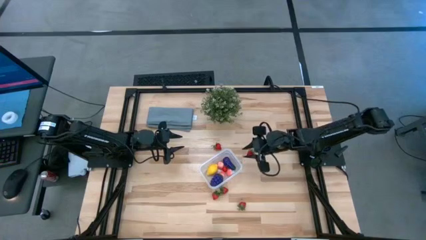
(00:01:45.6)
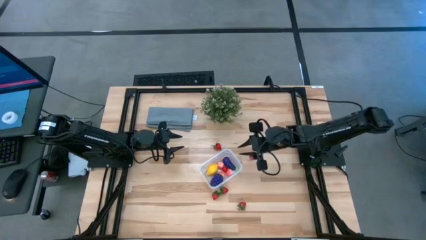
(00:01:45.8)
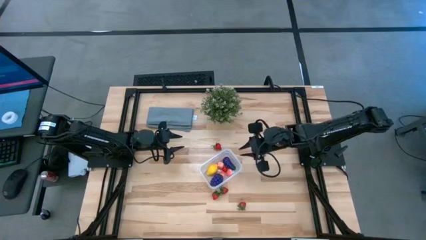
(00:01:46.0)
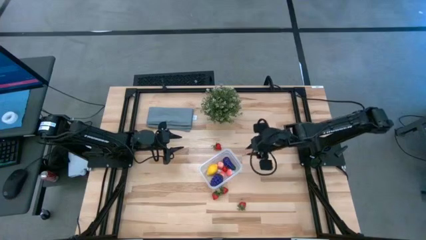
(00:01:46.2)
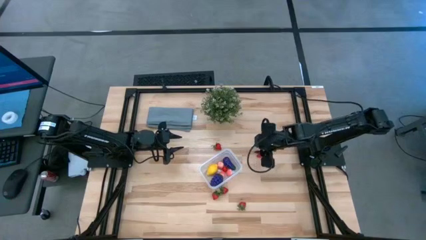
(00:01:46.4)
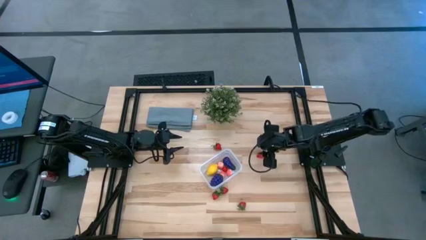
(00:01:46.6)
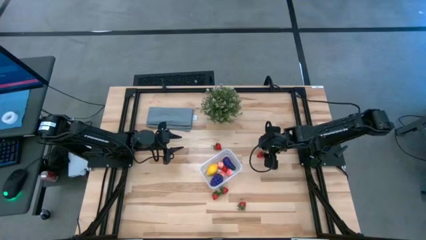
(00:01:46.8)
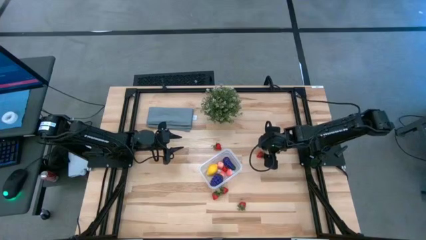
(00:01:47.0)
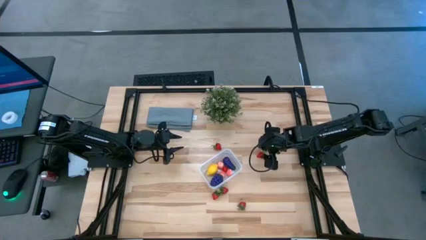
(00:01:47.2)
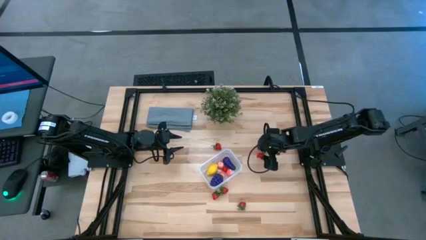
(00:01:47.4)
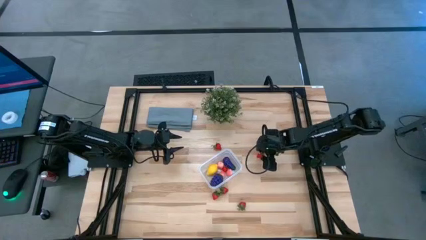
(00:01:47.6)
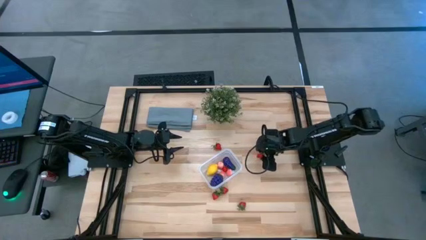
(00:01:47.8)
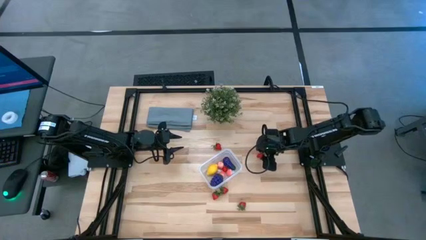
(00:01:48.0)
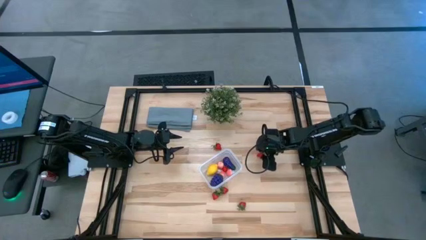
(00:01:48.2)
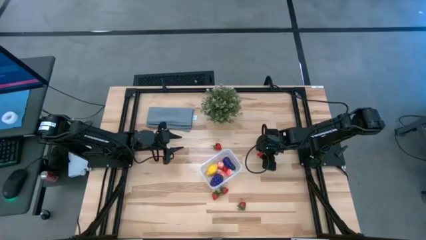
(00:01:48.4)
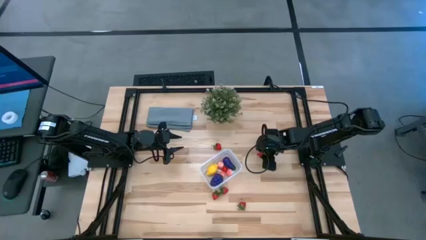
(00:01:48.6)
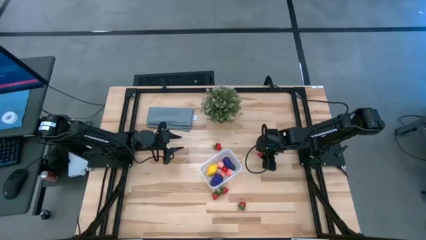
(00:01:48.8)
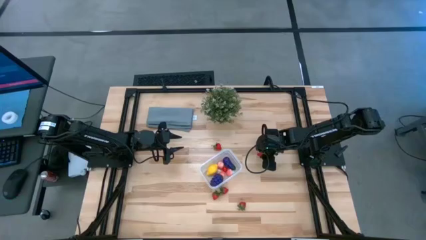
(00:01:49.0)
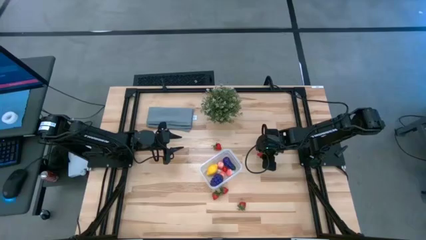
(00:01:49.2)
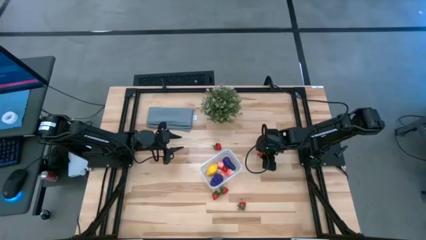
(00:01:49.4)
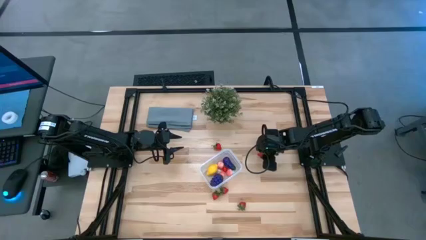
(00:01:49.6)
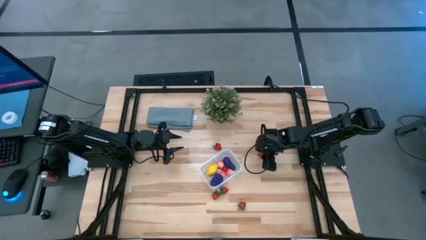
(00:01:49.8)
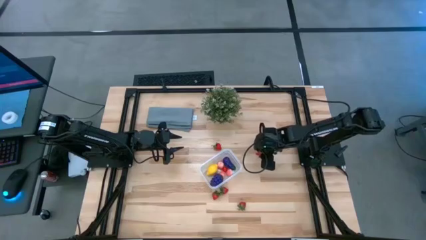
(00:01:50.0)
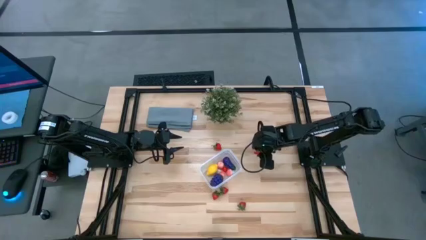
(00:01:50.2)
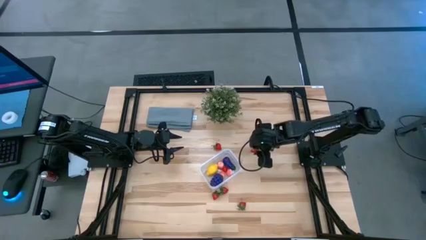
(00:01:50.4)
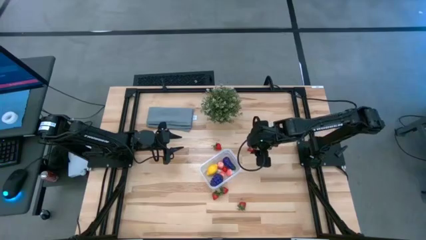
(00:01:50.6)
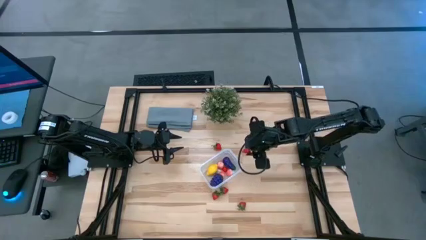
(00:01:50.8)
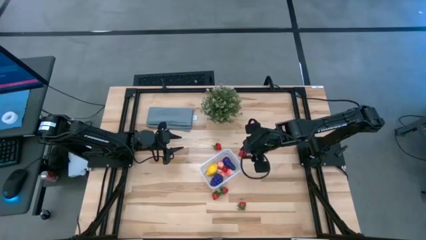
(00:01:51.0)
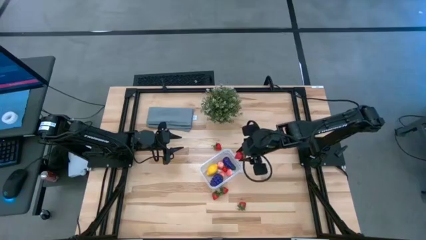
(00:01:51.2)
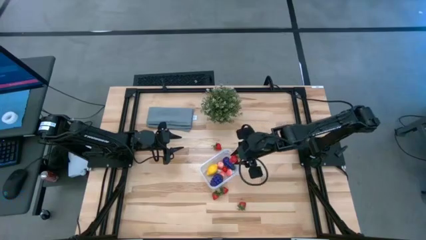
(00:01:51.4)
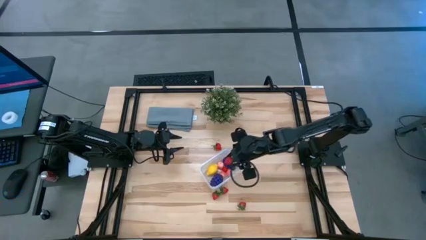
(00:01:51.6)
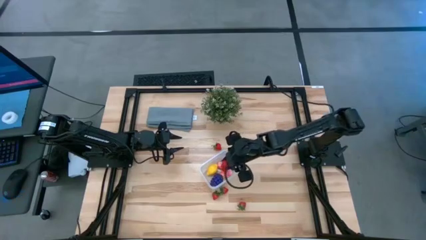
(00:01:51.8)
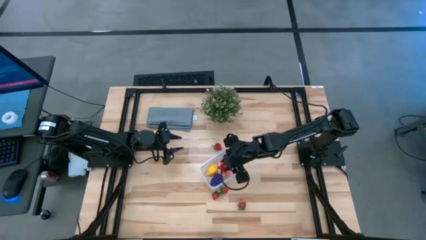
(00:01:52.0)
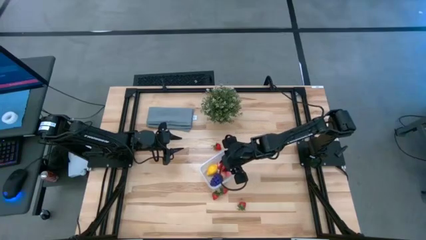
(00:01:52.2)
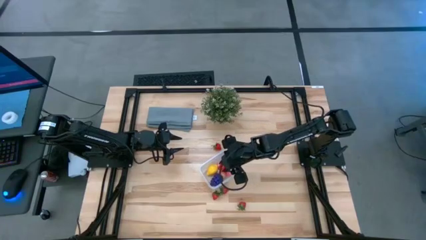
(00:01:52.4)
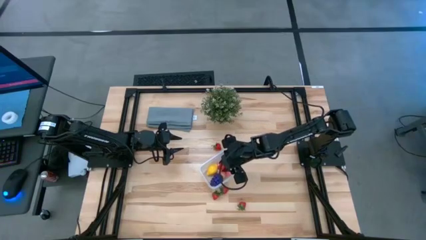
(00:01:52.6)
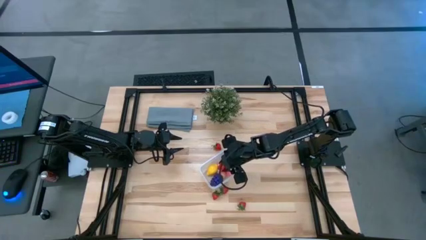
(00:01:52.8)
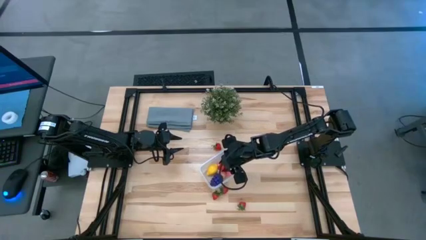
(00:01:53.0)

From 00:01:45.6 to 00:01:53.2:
Task: Pick and placing Produce into tupperware
Put the red strawberry into the transparent bin

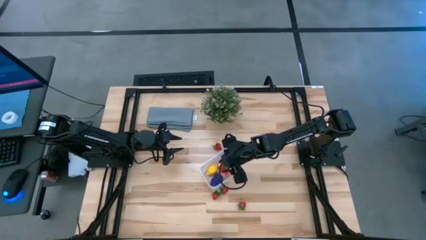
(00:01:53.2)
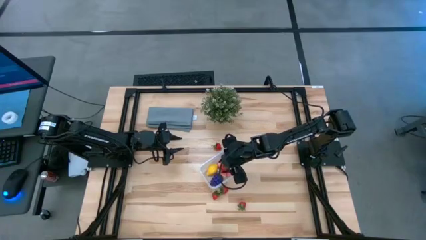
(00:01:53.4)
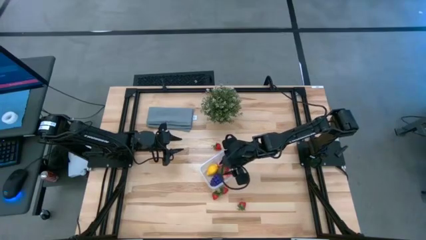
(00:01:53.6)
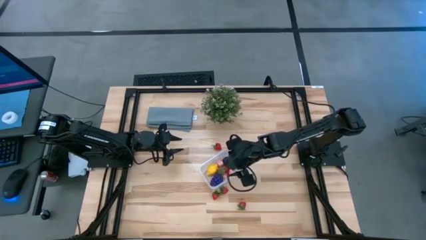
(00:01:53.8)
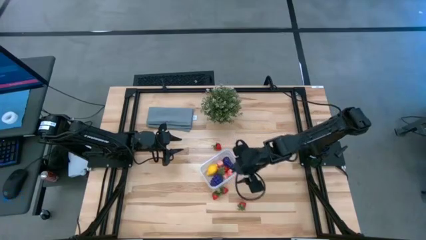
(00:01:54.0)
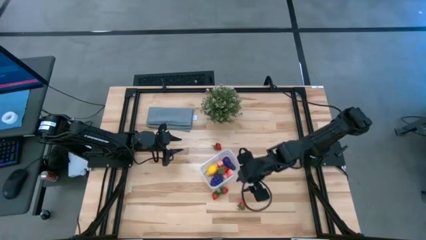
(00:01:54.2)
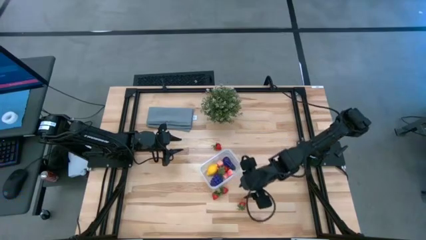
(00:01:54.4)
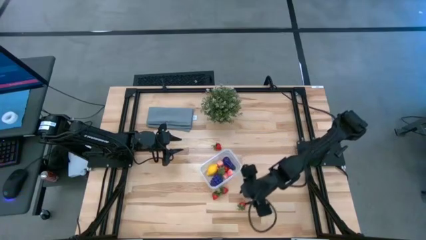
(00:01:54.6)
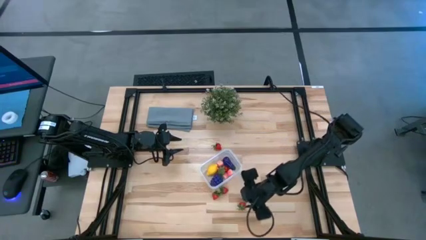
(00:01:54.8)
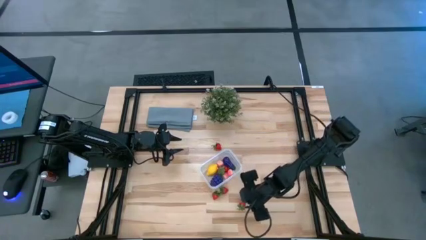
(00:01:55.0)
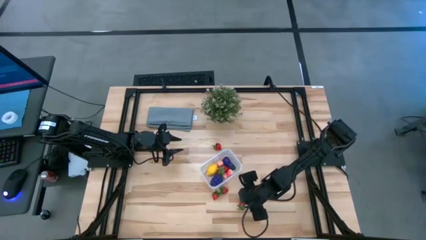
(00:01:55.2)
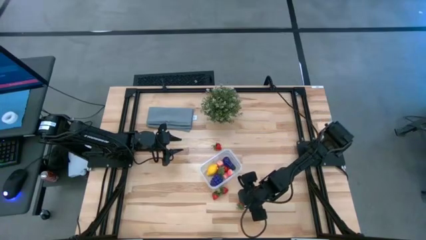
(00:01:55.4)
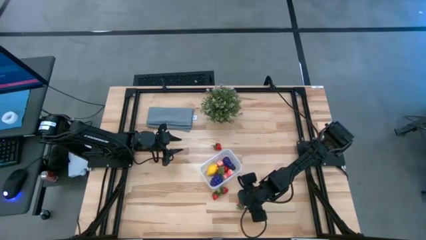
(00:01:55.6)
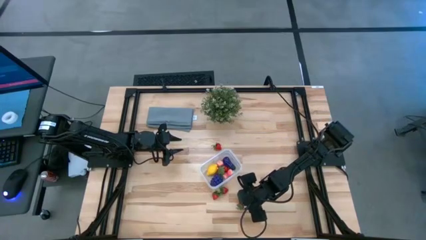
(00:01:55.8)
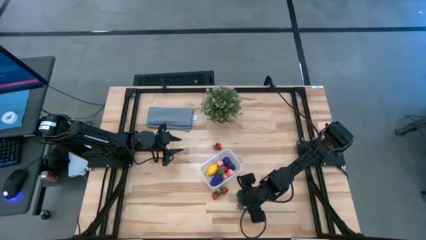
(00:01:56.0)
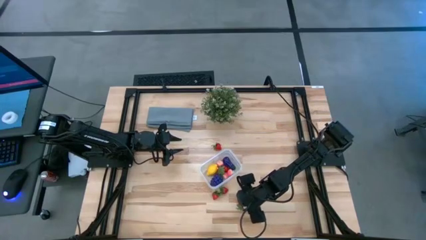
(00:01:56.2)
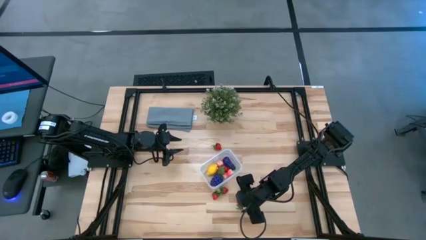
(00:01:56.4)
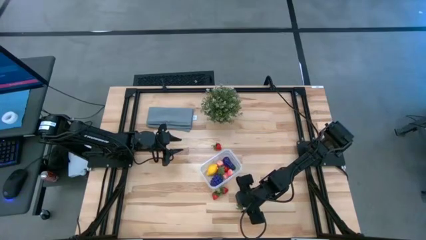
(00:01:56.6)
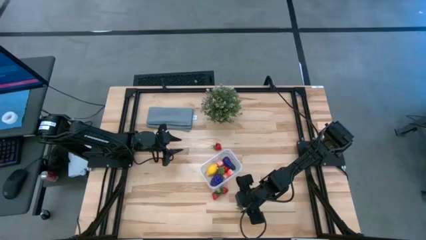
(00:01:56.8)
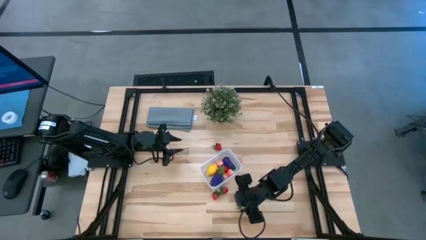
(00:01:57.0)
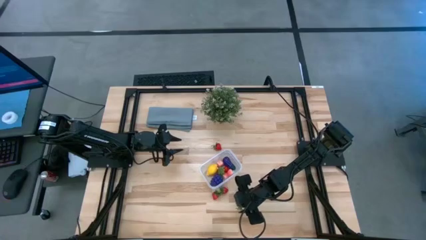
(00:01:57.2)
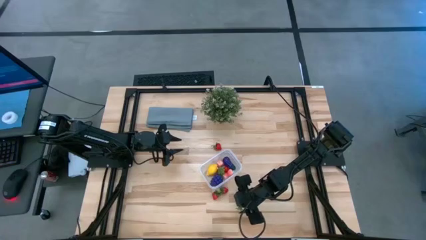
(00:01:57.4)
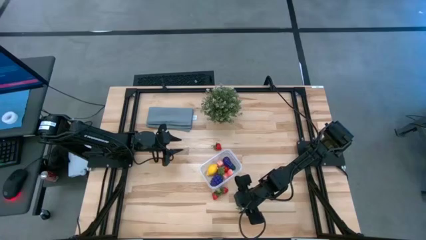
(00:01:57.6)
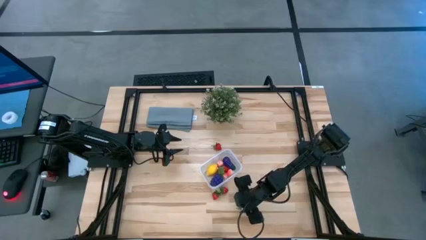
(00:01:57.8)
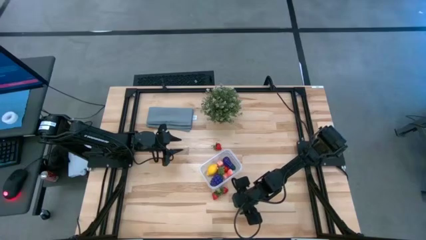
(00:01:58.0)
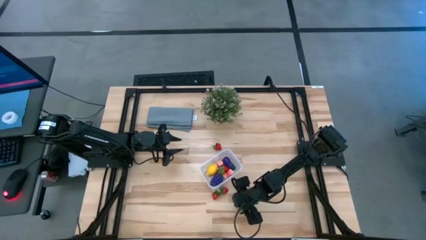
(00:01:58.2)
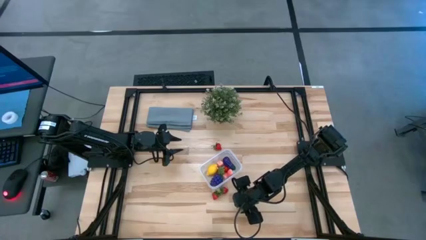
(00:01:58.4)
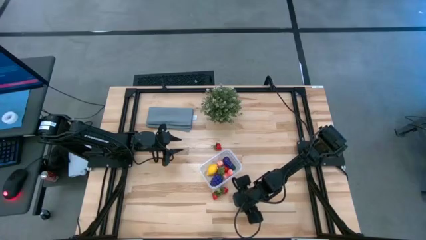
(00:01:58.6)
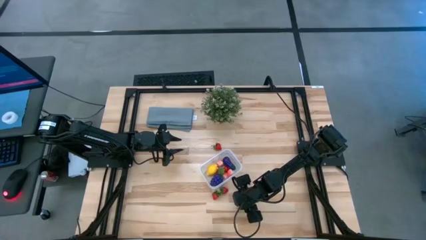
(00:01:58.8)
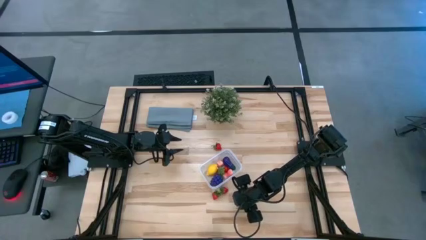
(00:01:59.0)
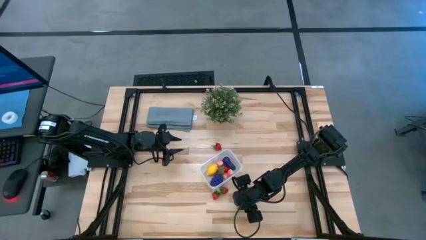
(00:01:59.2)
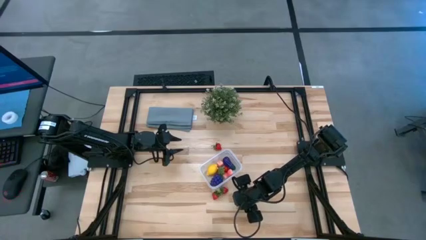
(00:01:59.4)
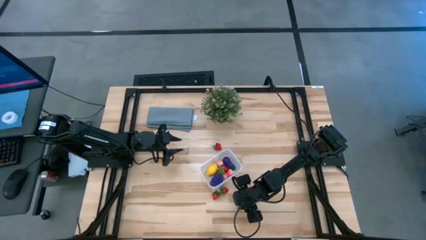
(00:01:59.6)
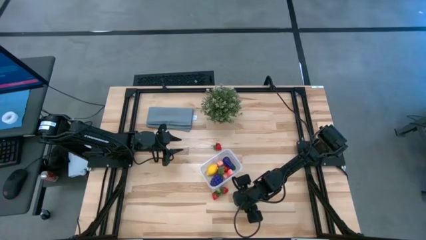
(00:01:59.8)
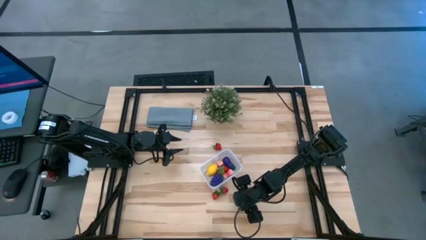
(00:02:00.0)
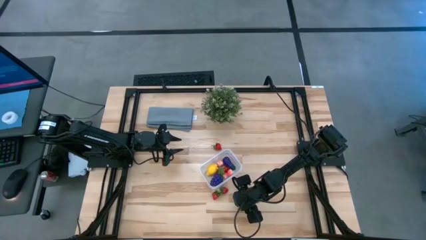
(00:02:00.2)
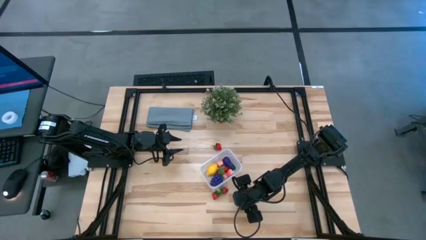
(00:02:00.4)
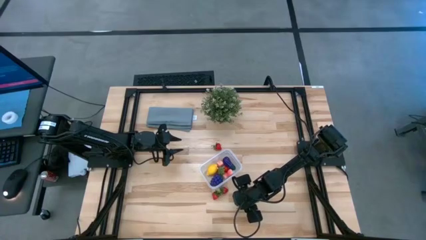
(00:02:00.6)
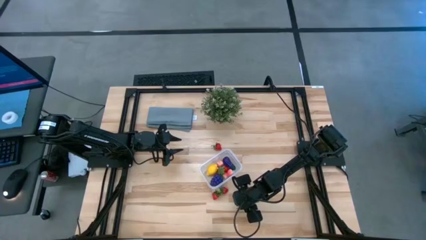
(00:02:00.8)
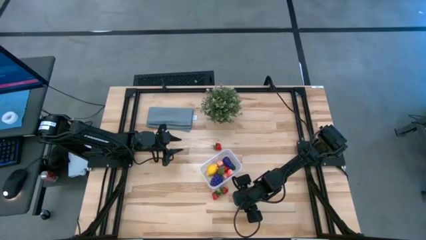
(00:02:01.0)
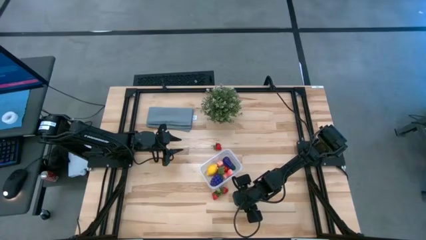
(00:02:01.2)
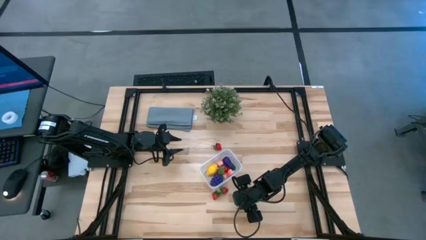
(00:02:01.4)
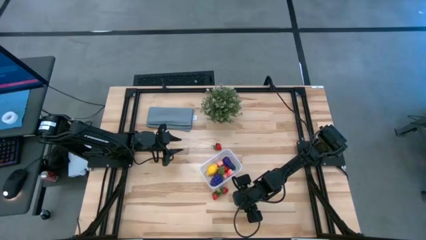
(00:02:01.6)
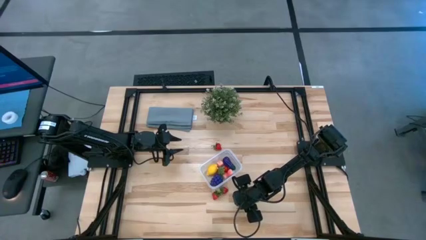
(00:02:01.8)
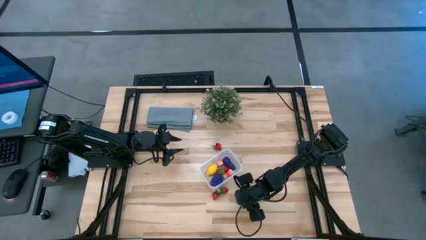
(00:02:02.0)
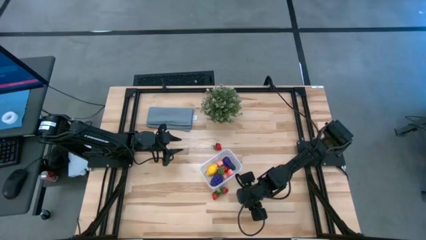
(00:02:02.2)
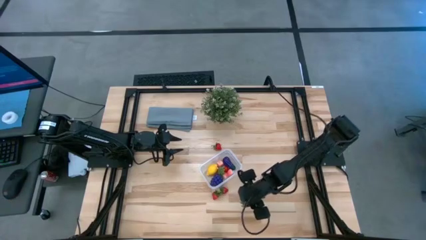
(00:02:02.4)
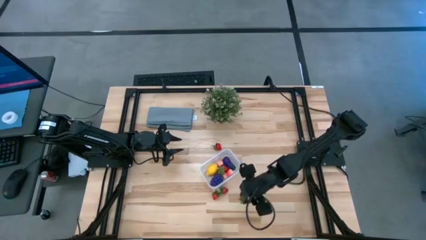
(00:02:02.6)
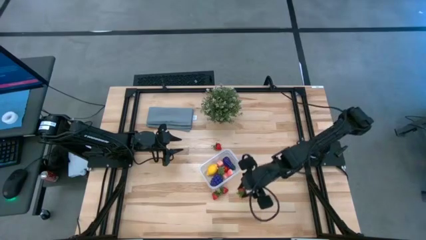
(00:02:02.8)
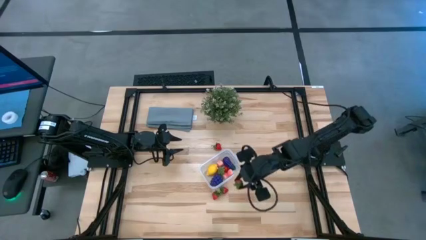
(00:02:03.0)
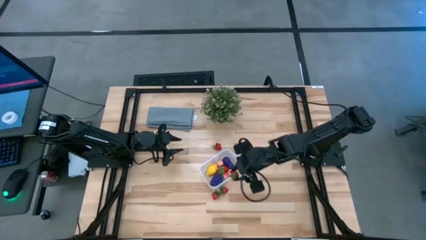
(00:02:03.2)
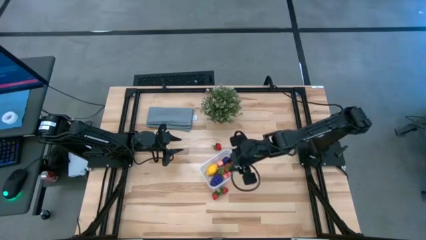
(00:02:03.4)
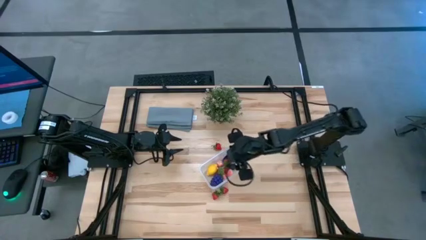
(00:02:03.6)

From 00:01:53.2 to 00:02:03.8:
Put the red strawberry into the transparent bin
